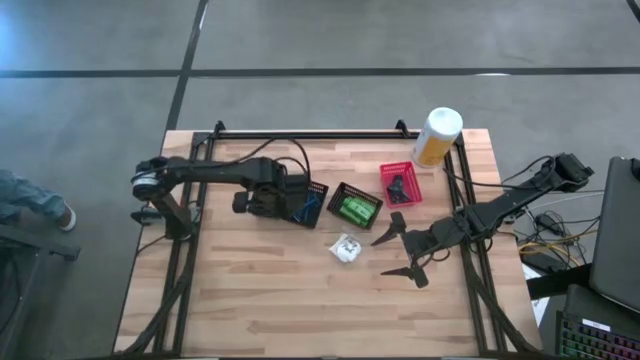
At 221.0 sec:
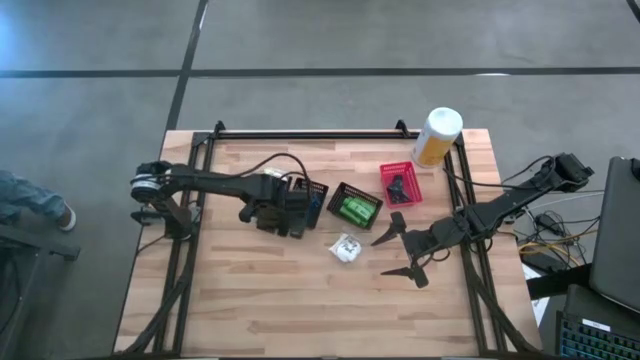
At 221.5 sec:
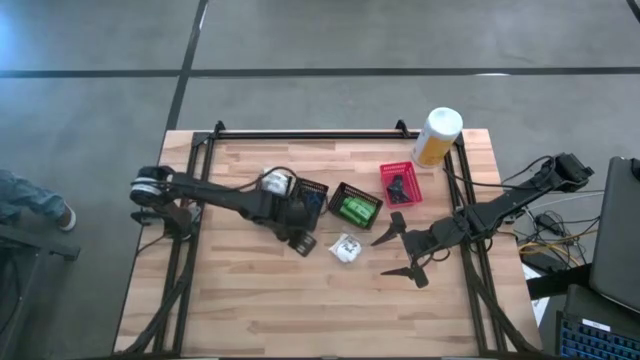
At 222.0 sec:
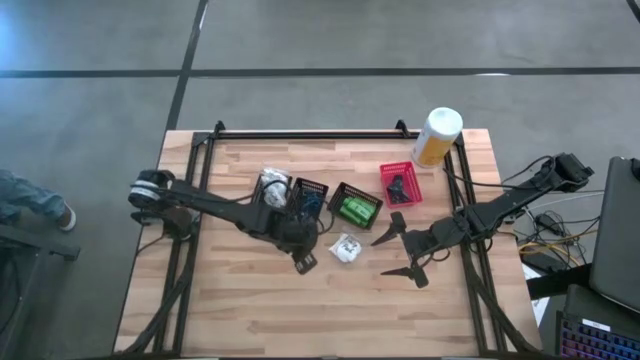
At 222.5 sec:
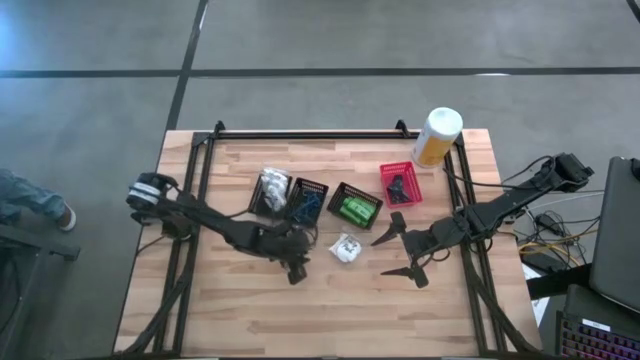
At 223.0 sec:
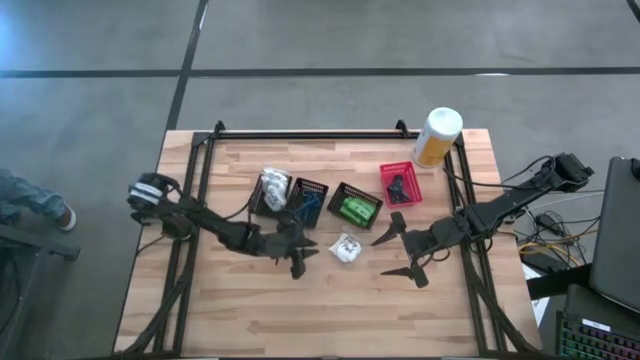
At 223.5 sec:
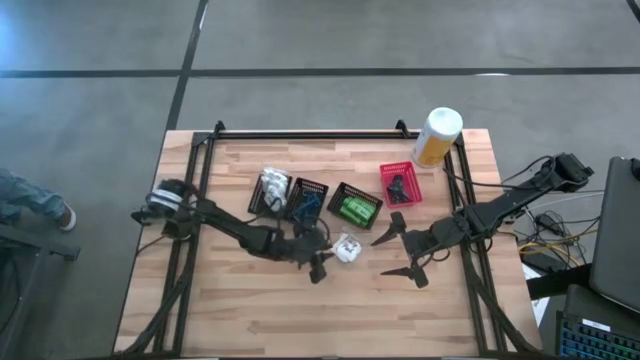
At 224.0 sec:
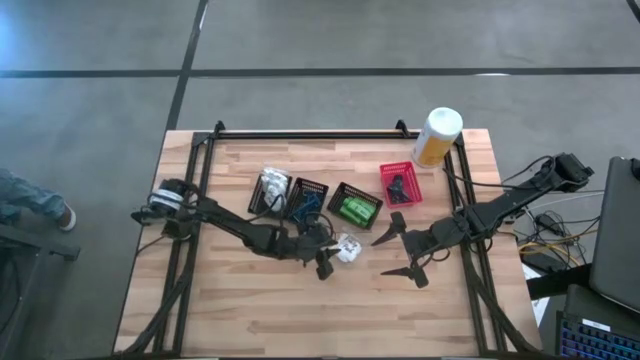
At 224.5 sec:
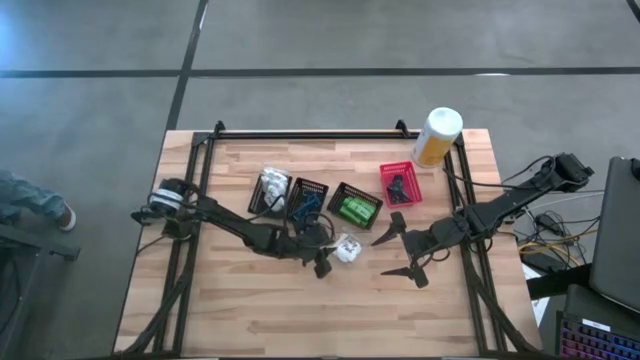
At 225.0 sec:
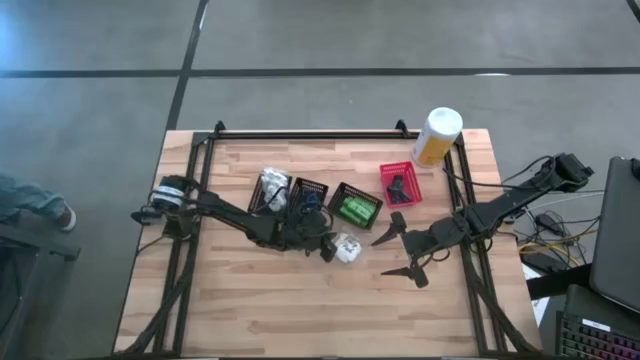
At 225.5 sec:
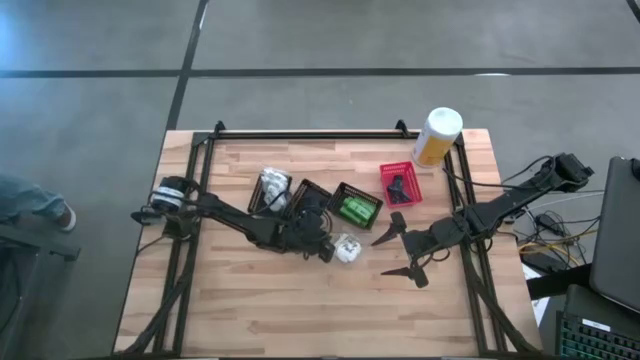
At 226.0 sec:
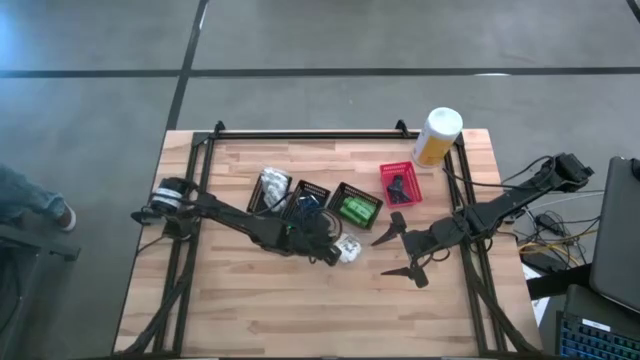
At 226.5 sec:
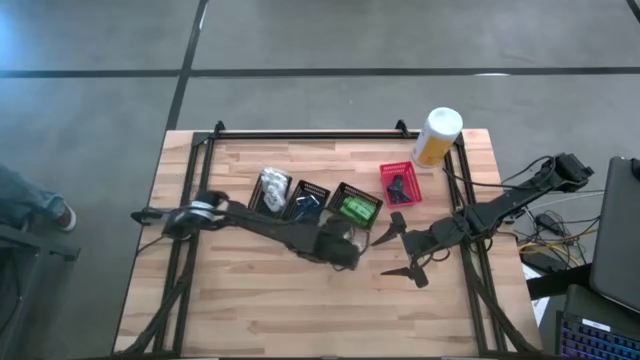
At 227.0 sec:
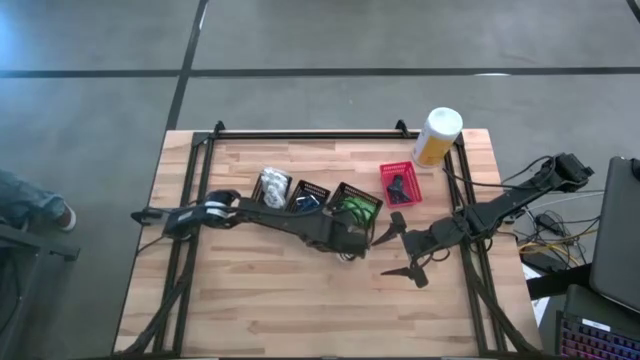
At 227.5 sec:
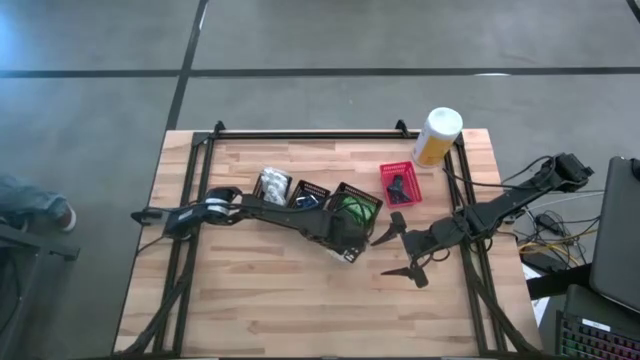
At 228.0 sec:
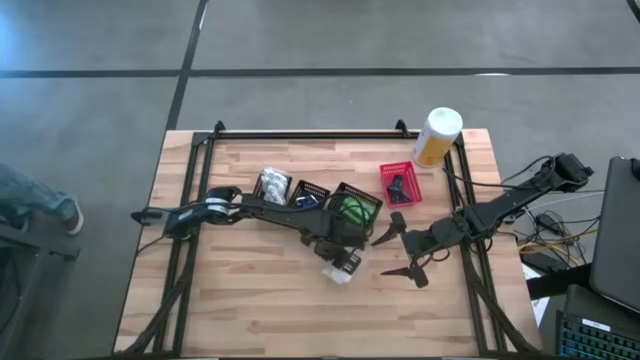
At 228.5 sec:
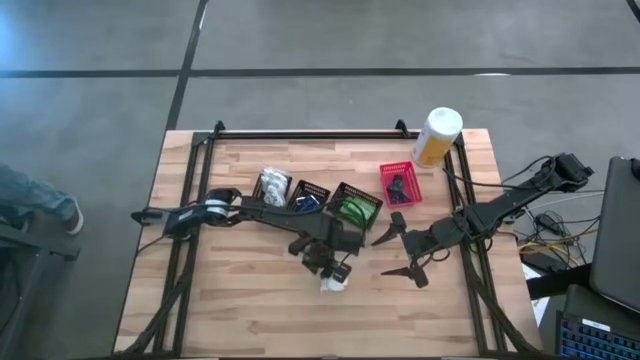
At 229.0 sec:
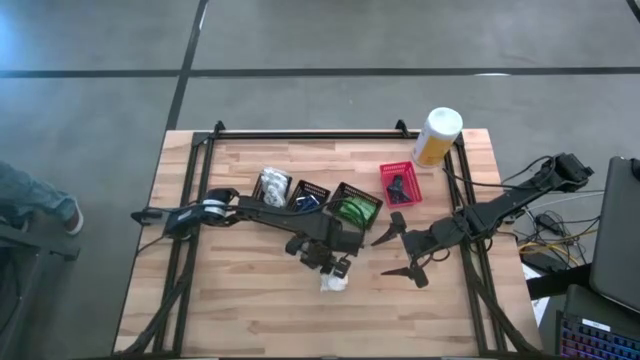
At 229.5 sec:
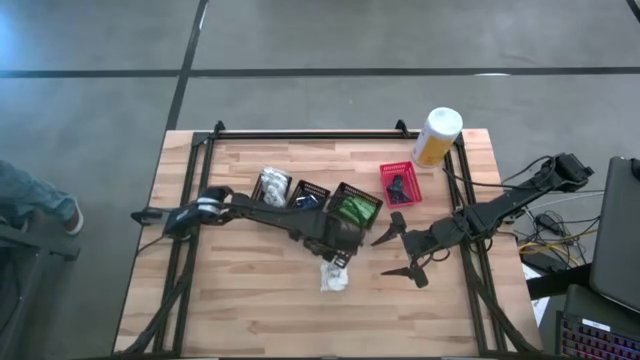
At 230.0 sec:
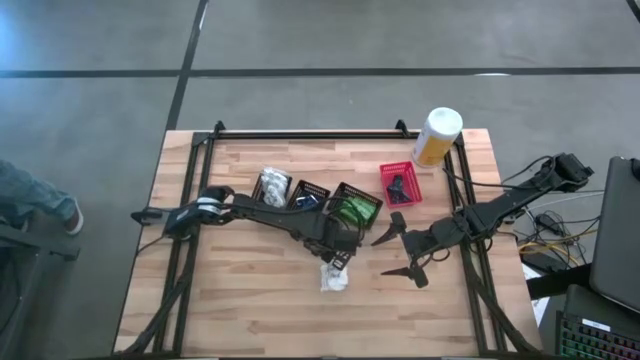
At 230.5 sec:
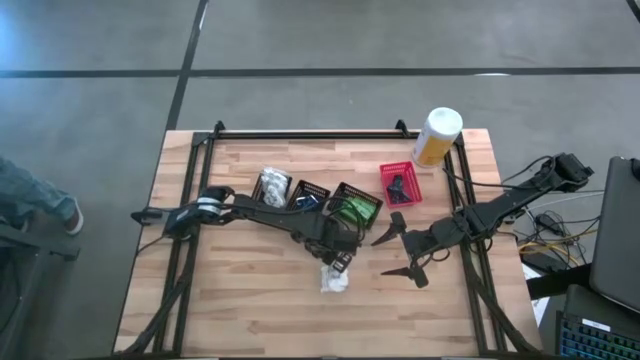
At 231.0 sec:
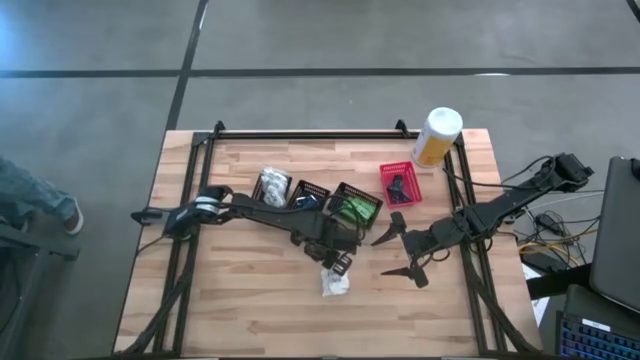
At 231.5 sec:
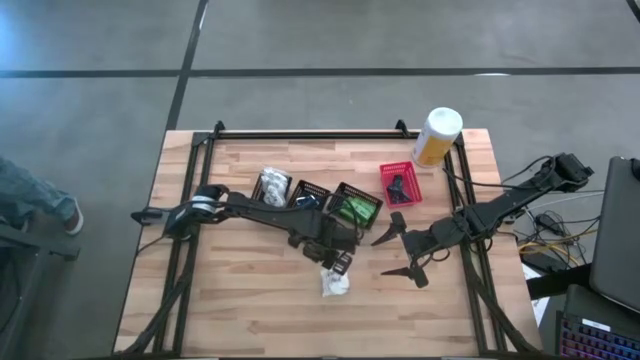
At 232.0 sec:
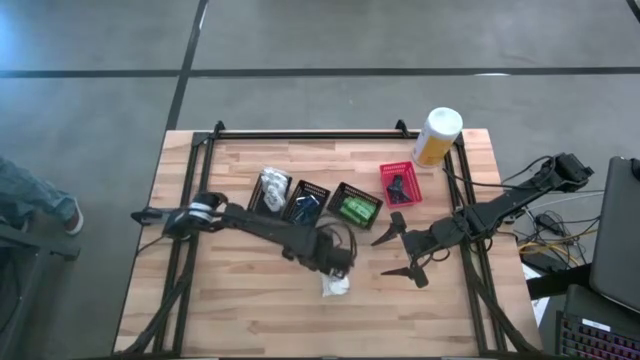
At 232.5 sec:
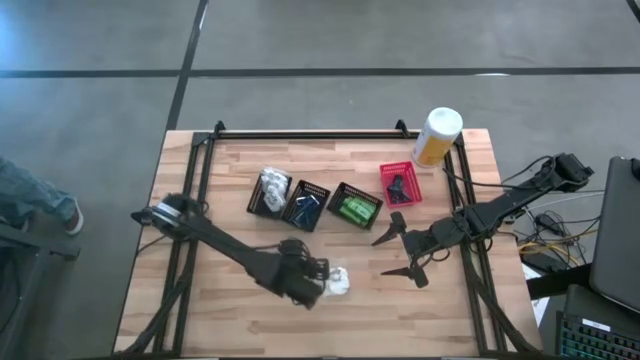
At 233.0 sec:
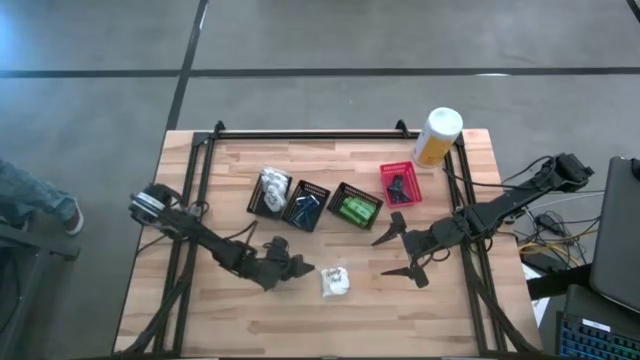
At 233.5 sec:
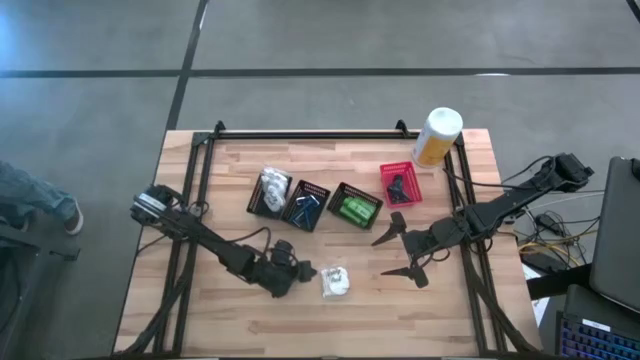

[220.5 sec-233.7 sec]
Task: Pick & Place Travel size toiletries
Put the vanity pack into the left black bin

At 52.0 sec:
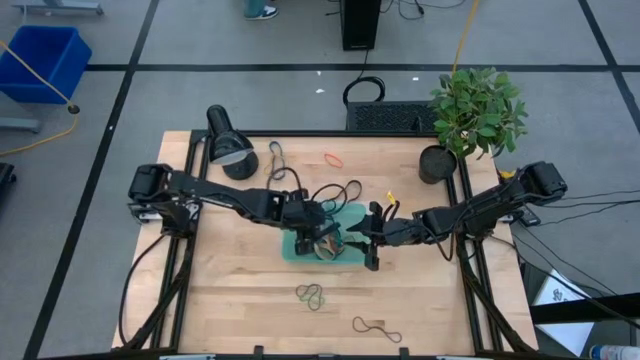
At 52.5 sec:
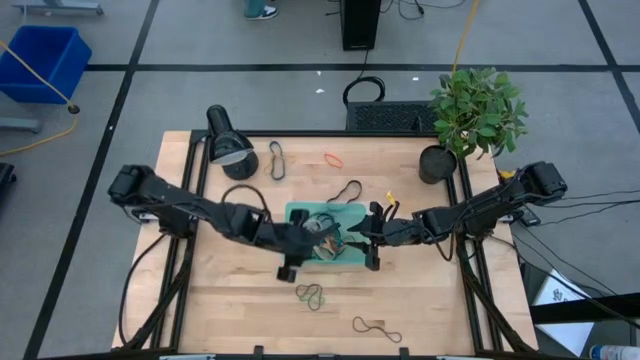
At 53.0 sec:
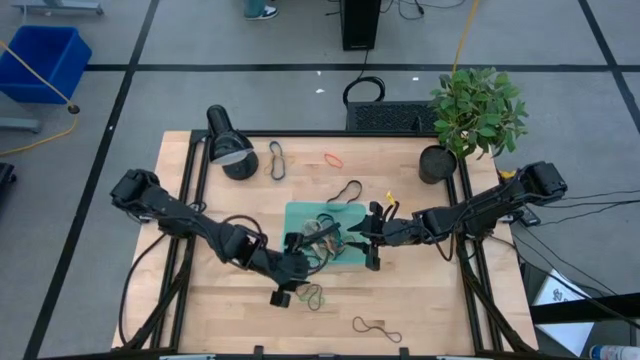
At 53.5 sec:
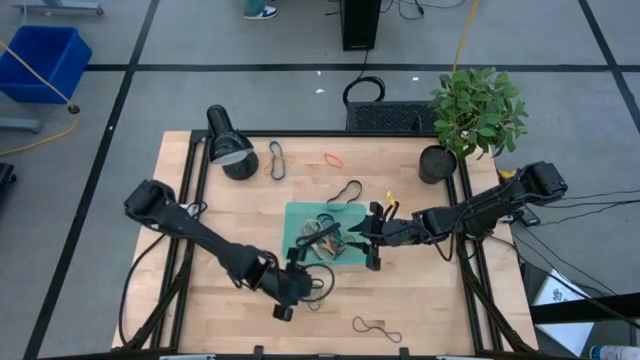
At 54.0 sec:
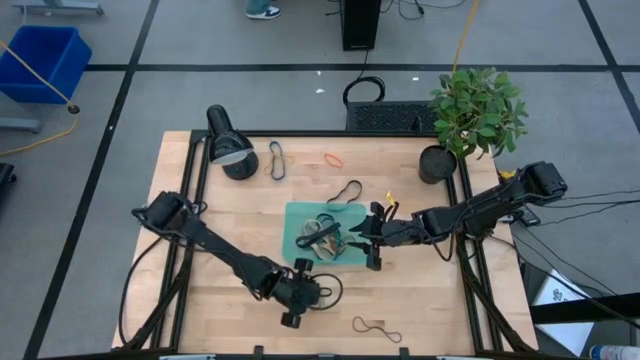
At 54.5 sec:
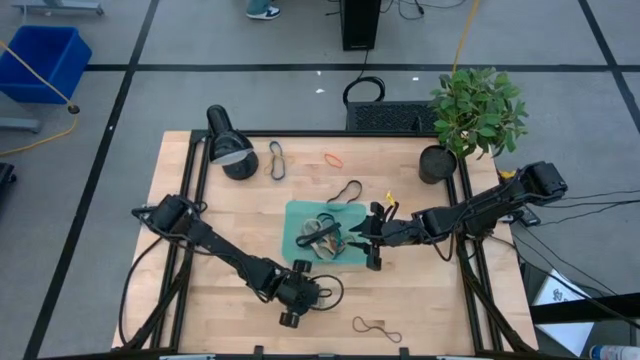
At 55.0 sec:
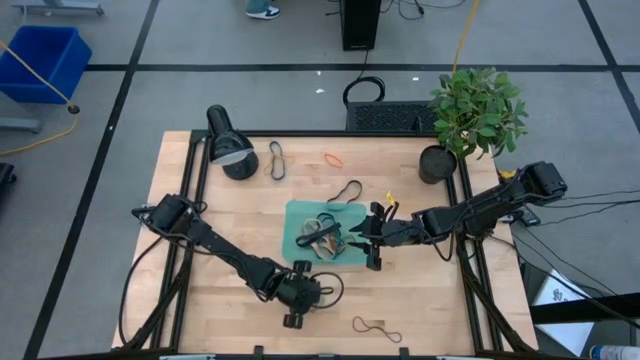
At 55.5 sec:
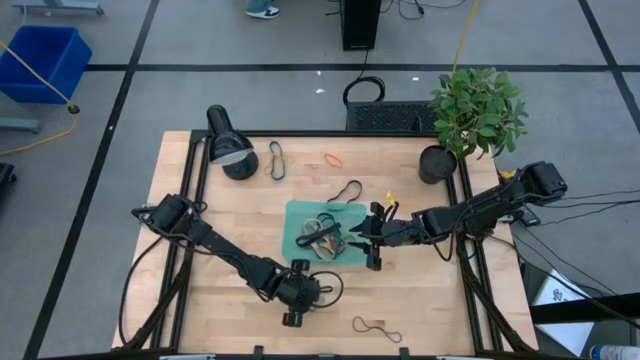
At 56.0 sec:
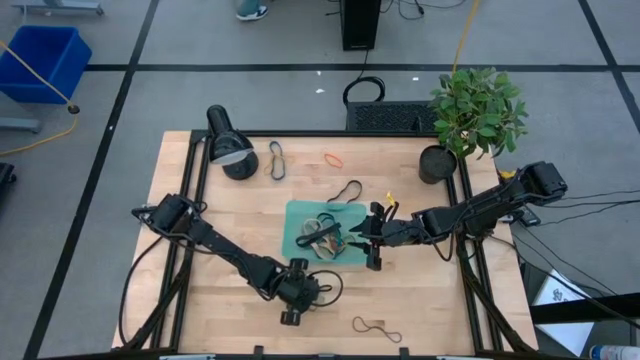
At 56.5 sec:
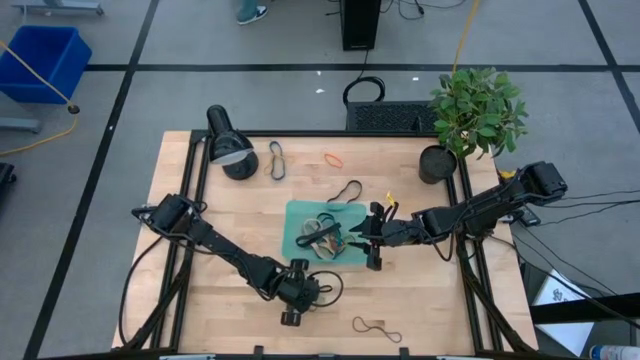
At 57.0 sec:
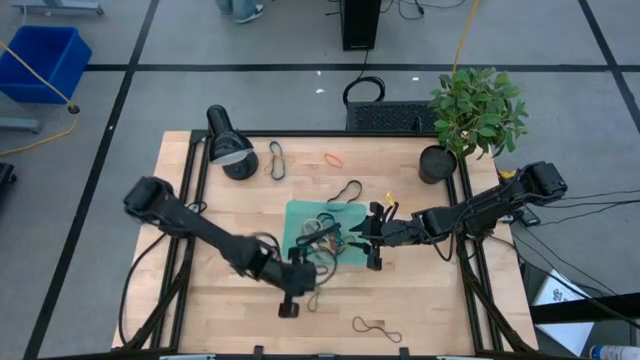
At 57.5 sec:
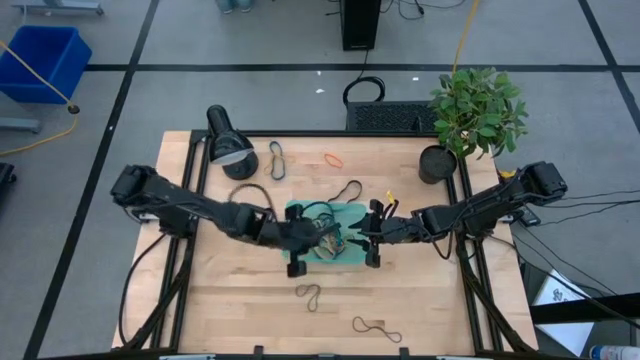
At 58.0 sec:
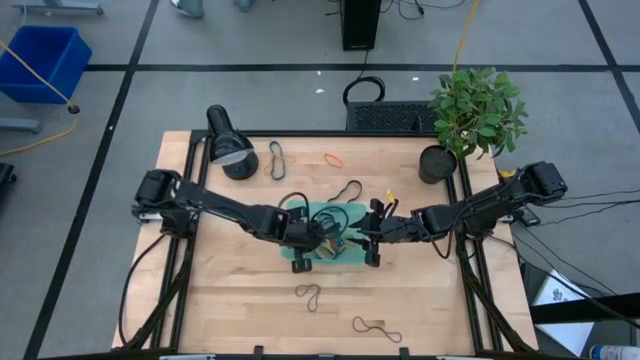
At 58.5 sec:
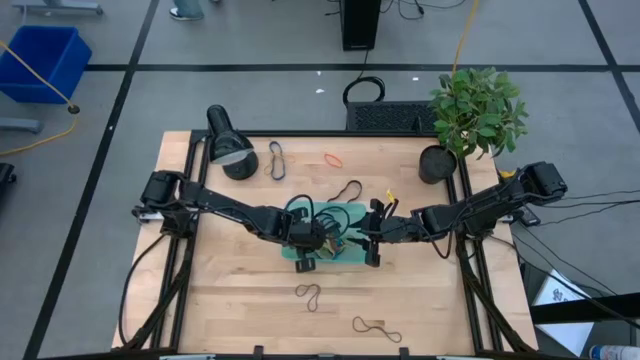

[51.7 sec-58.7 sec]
Task: Pick and place rubber bands into bin
Put the green rubber band into the green bin
